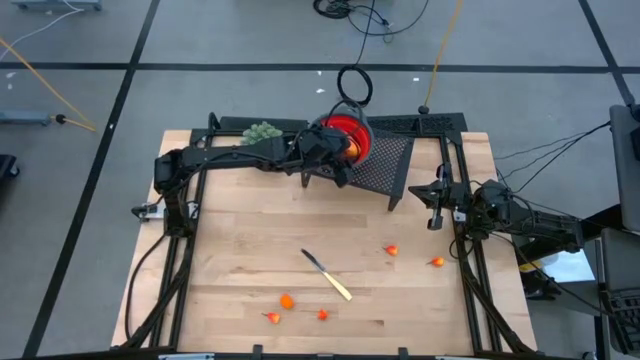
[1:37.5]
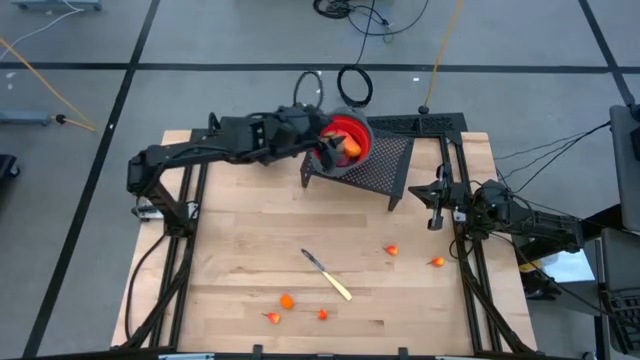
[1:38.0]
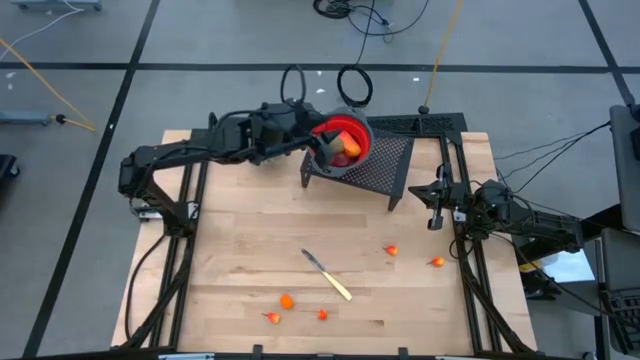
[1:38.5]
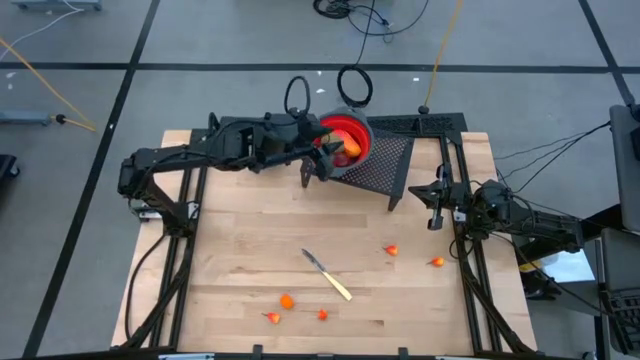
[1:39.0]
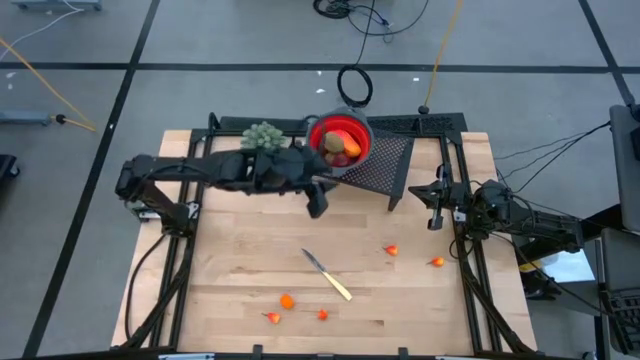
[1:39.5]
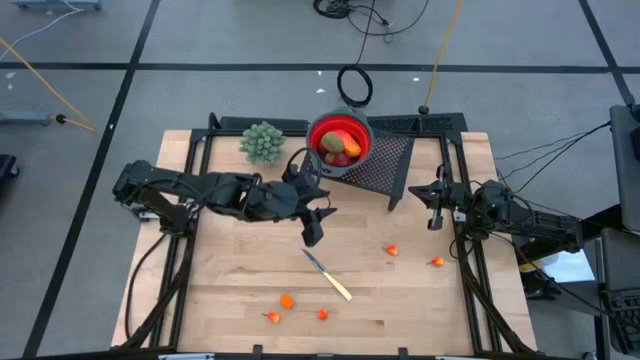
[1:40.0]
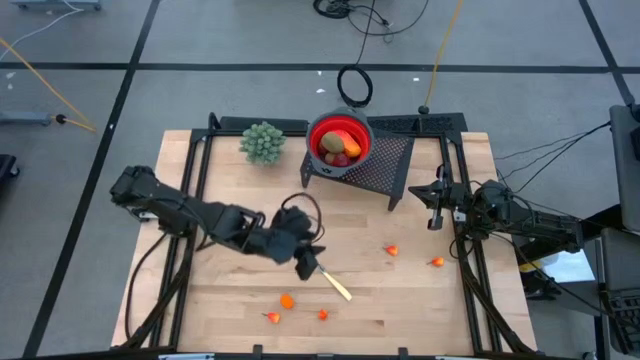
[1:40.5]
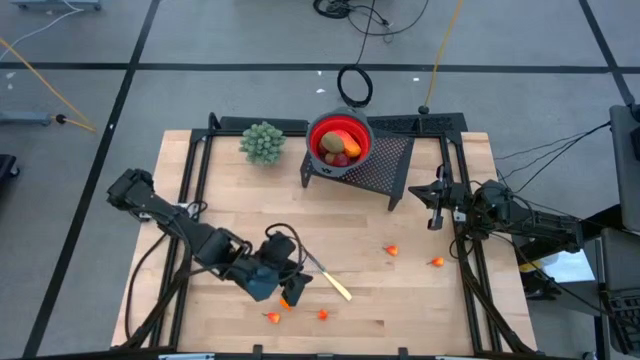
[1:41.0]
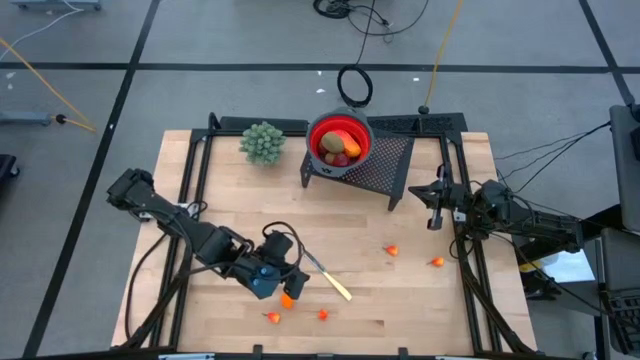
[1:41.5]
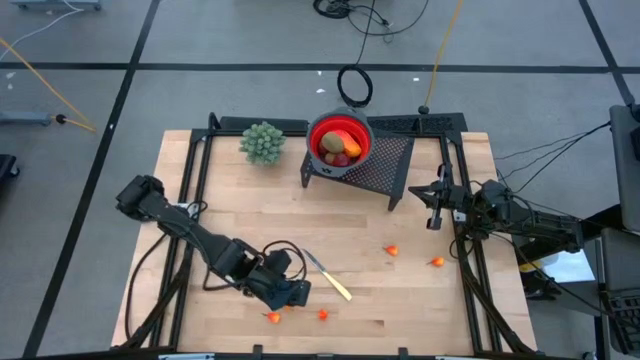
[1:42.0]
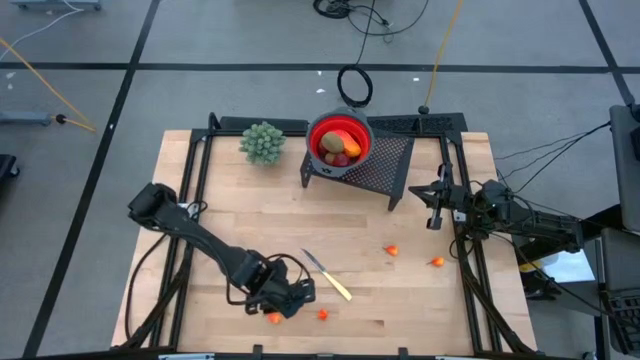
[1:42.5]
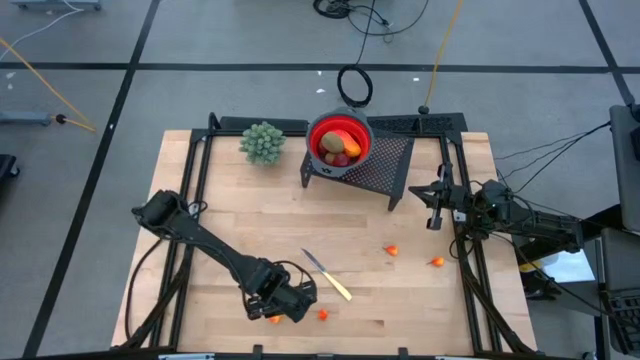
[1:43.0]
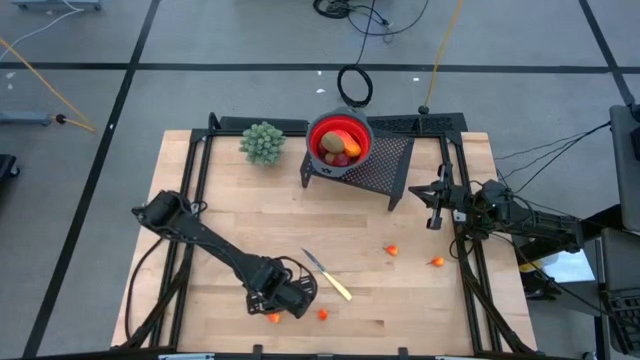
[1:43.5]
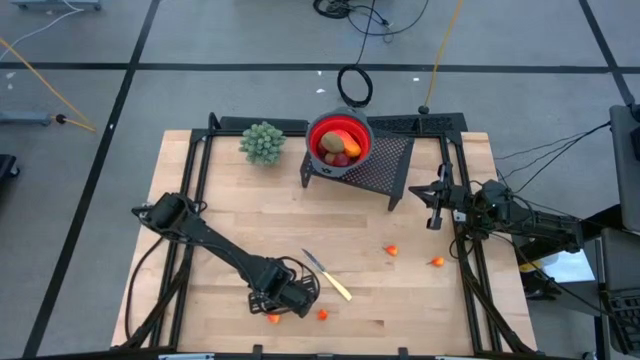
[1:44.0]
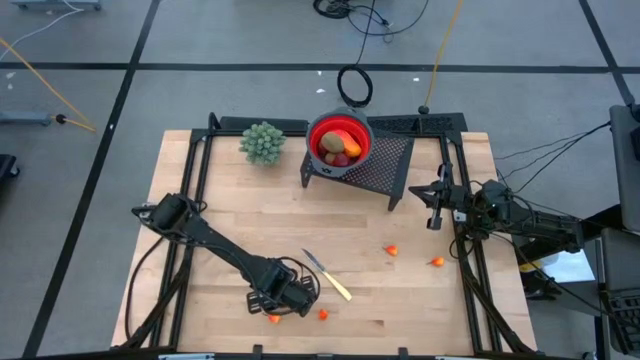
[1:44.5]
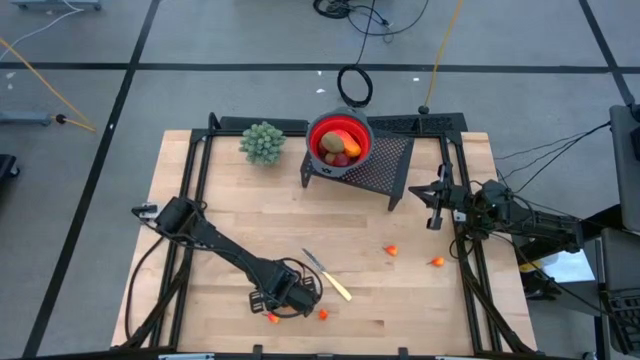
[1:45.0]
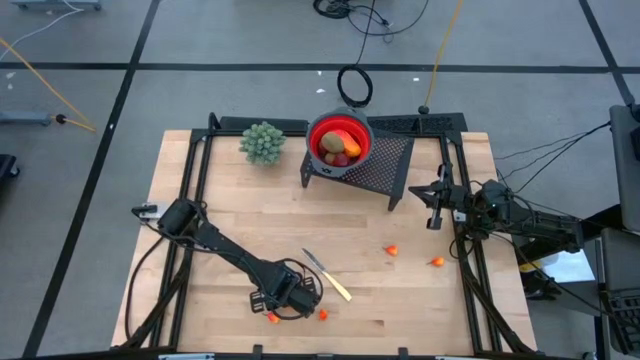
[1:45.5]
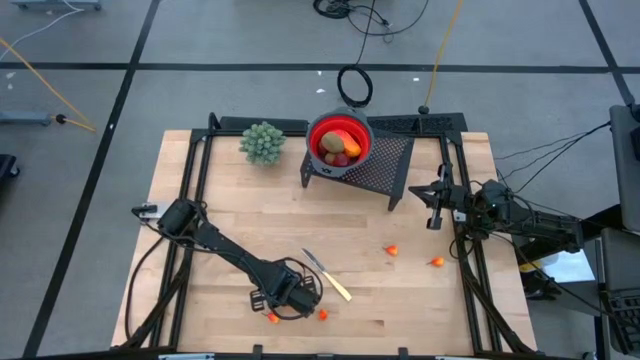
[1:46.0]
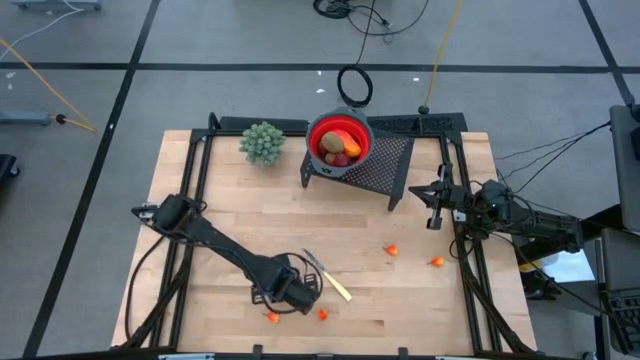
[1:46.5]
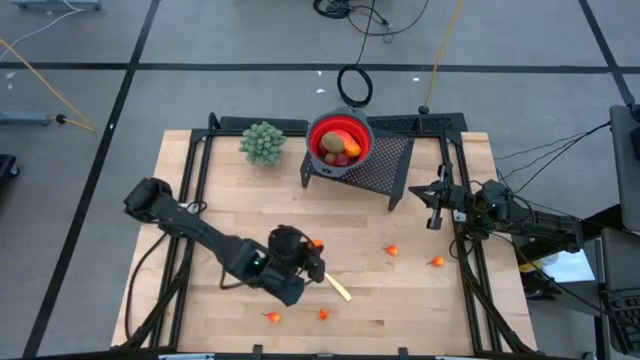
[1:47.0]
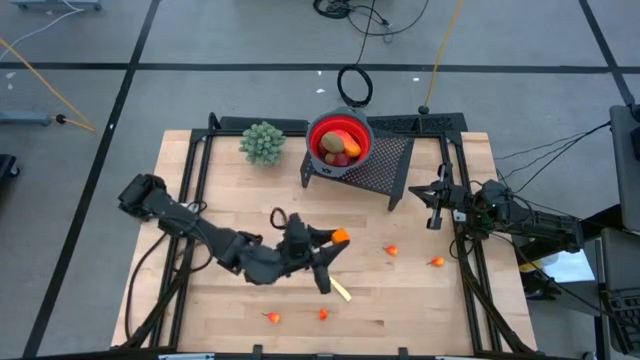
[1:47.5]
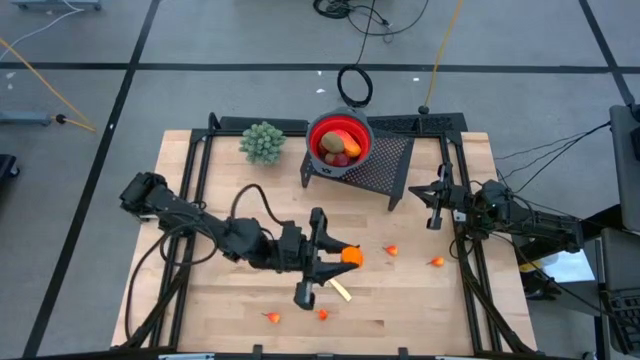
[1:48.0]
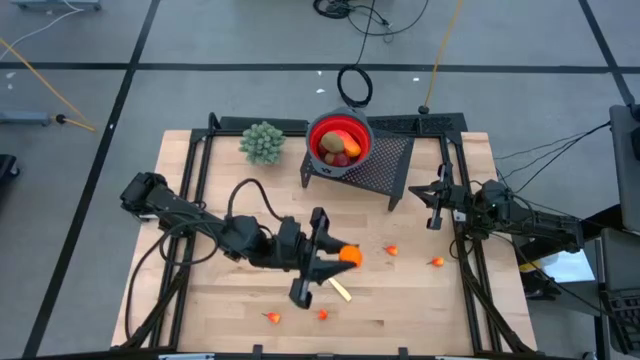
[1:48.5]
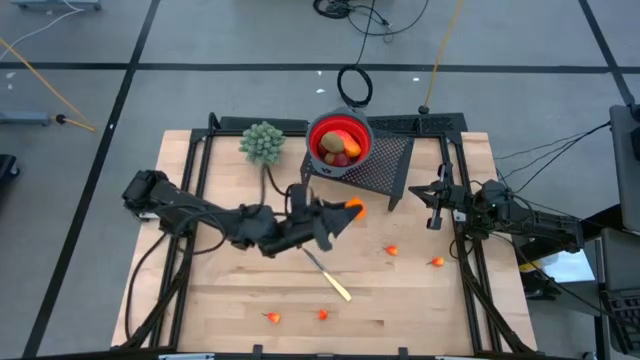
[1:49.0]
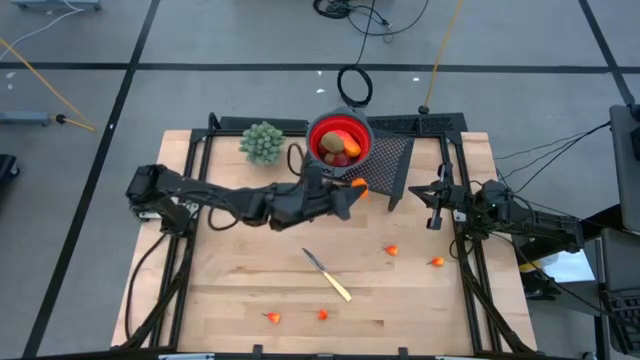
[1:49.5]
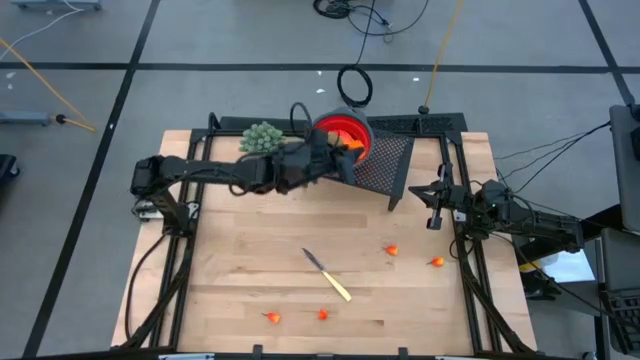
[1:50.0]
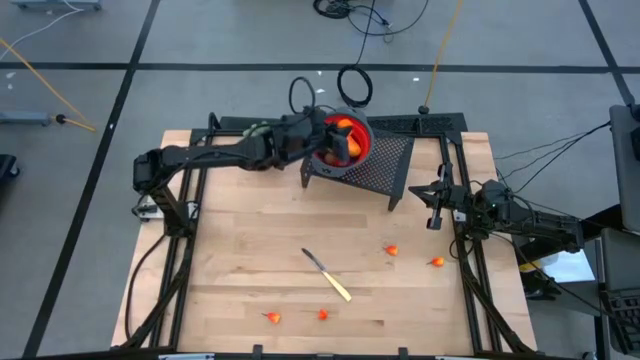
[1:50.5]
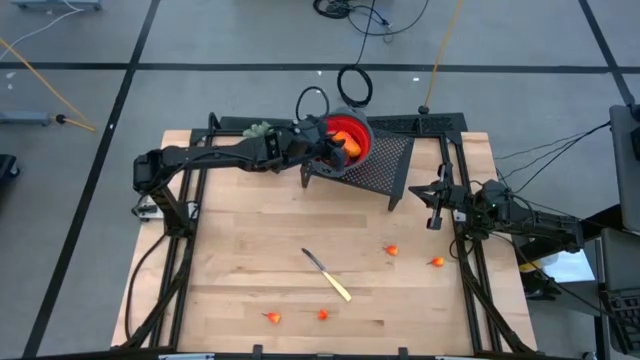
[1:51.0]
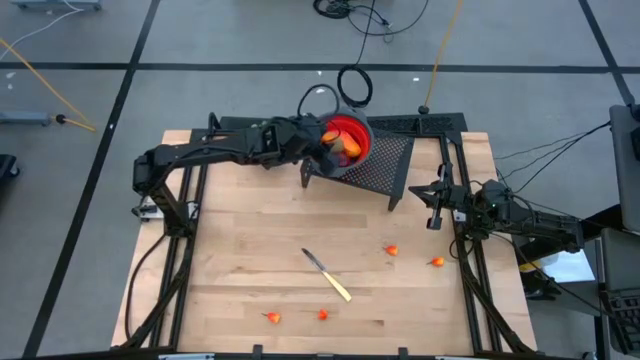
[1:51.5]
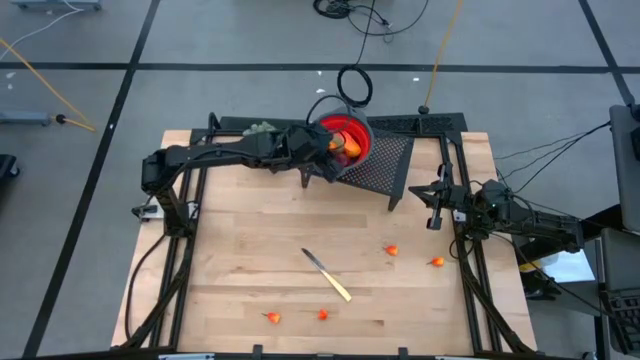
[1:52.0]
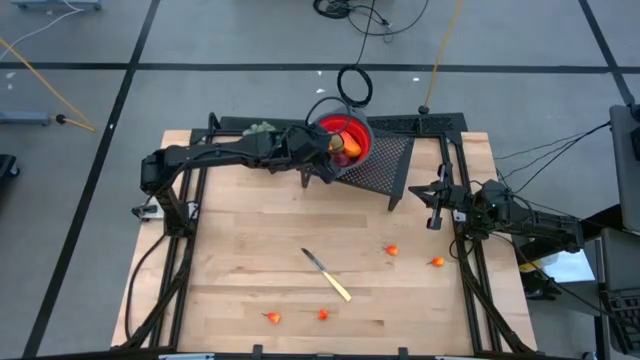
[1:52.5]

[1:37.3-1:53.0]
Task: Pick & Place Fruit
Put the orange into the red strainer bowl on the shelf

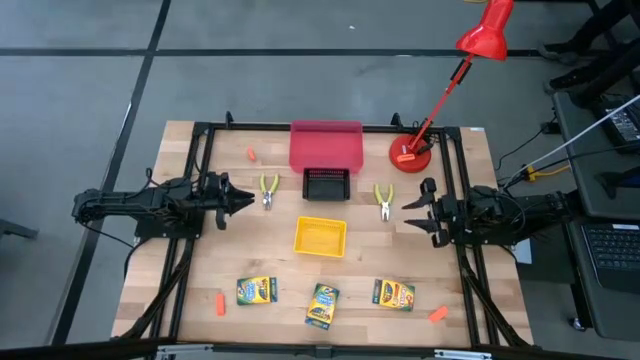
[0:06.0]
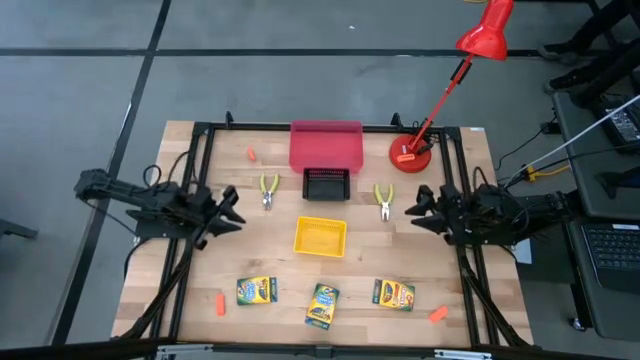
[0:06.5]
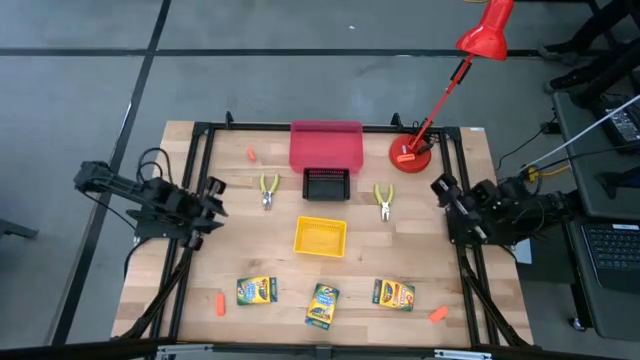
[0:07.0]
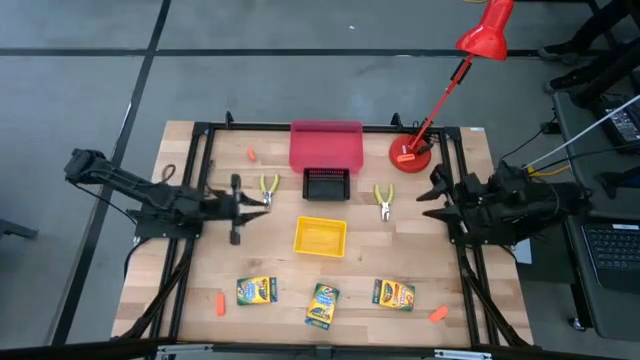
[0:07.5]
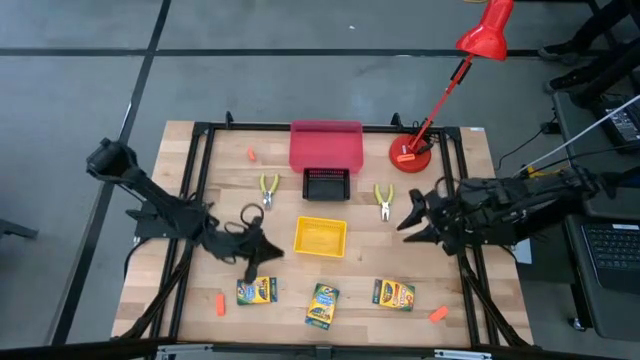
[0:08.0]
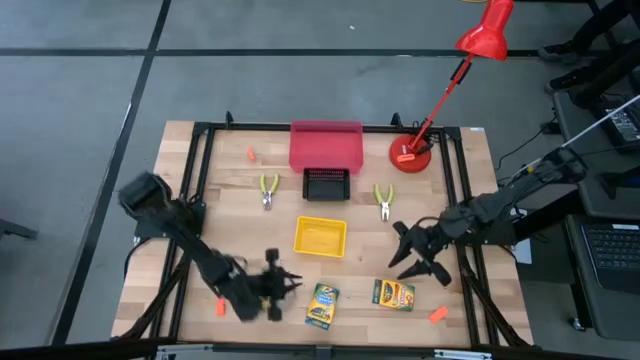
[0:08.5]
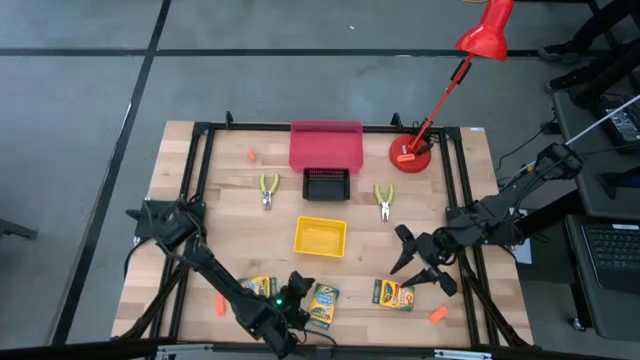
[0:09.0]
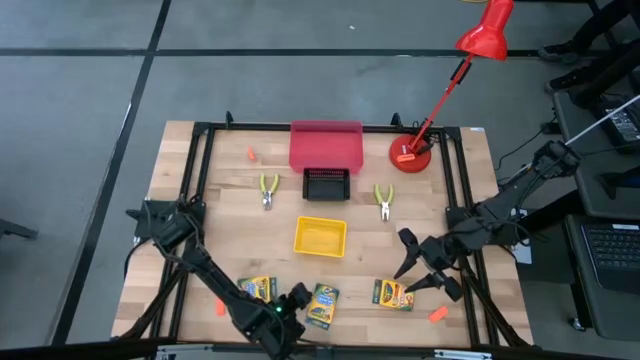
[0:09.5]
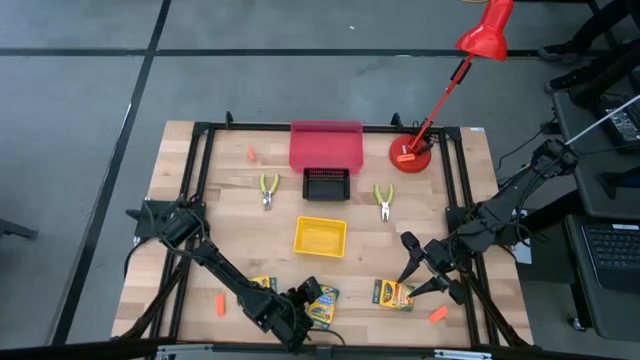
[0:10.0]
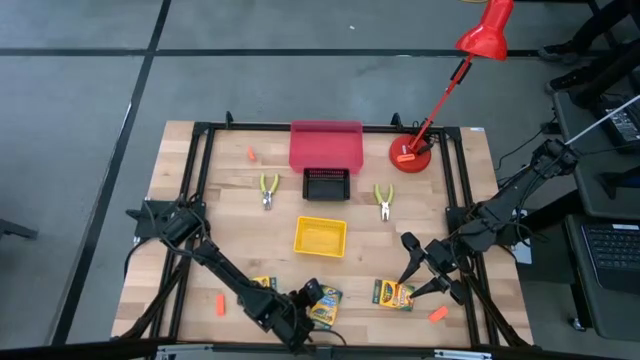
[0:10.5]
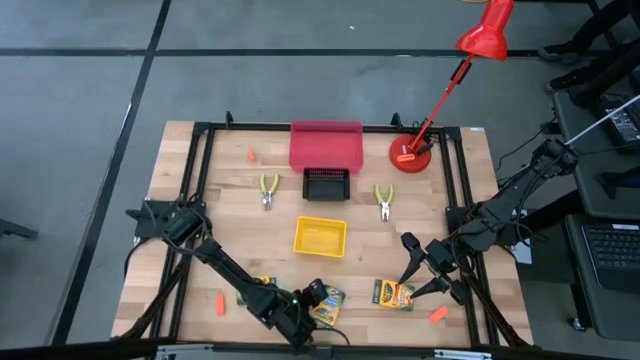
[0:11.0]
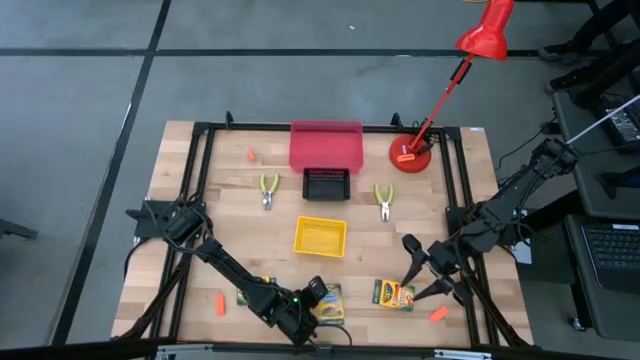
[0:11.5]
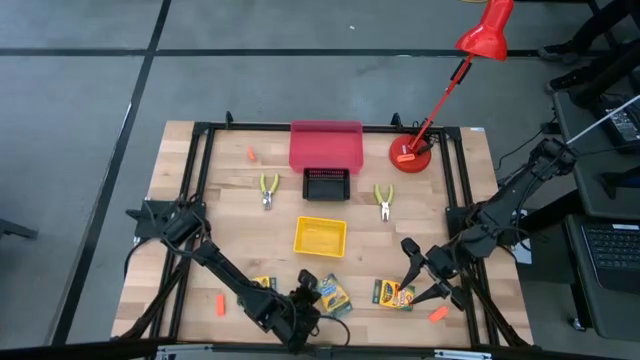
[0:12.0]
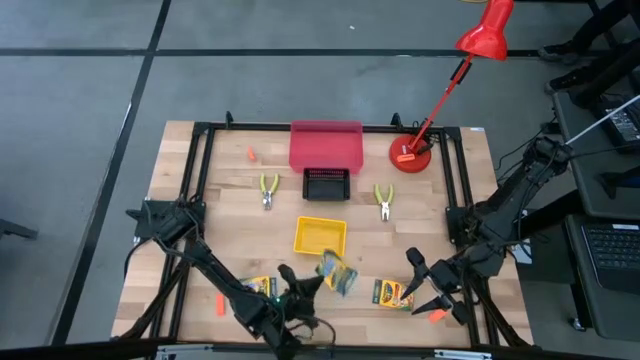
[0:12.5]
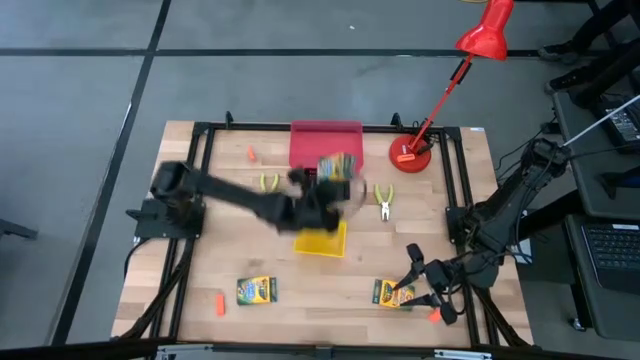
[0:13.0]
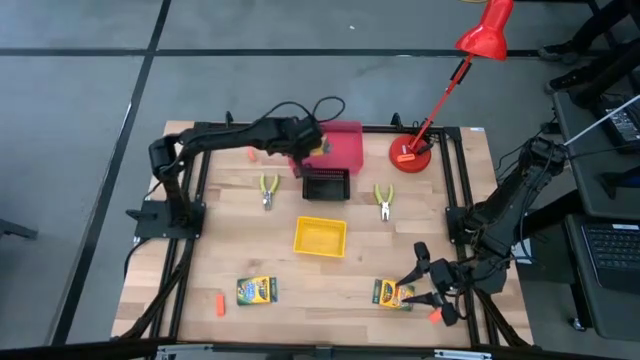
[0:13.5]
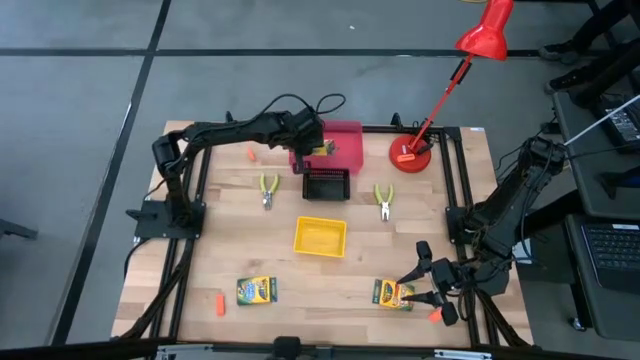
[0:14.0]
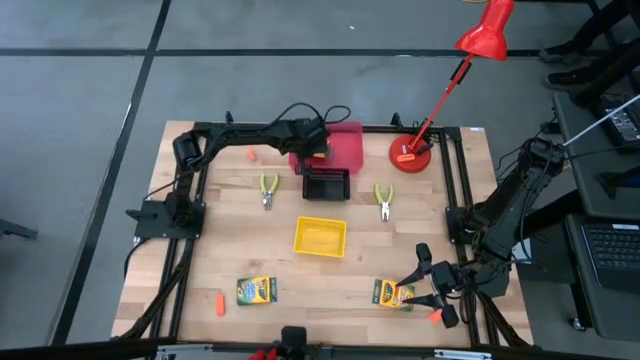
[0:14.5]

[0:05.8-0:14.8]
Task: Pick & Place School Supplies
Put the yellow crayon box into the red bin
